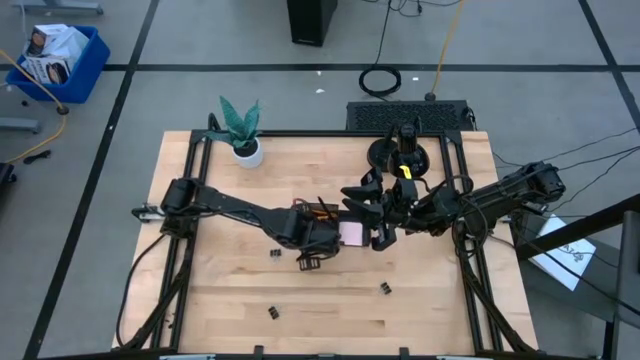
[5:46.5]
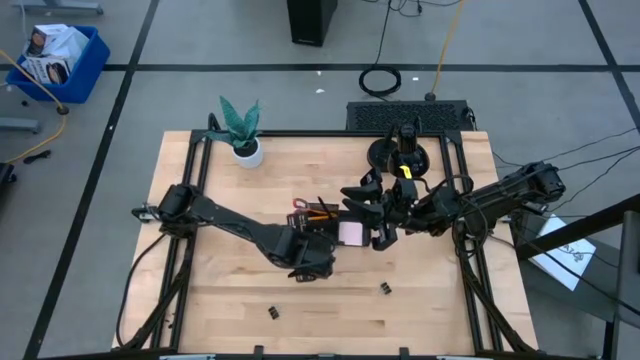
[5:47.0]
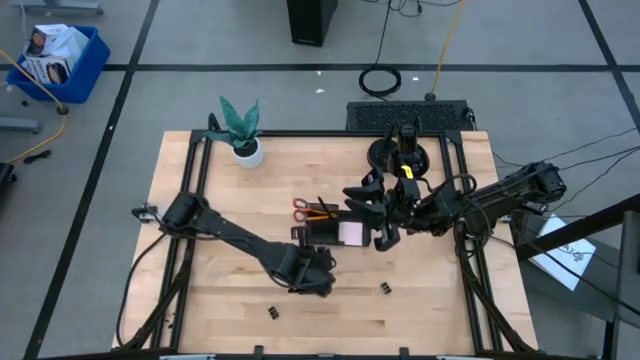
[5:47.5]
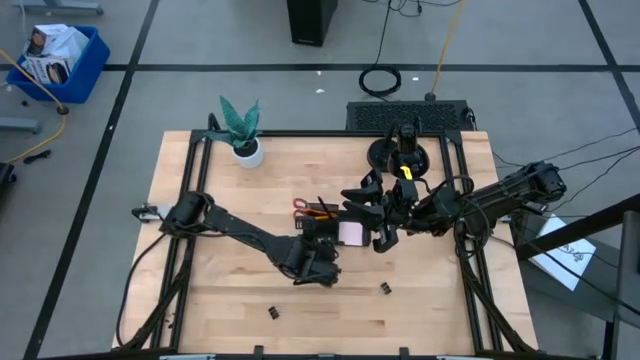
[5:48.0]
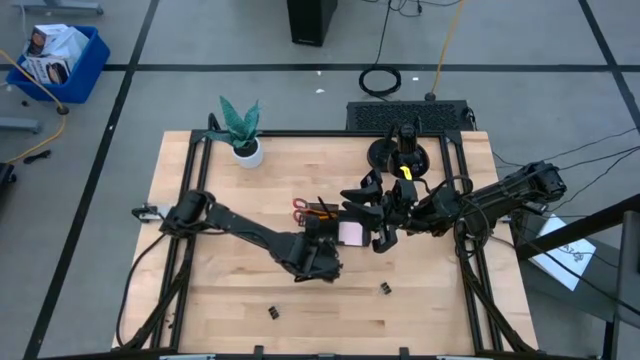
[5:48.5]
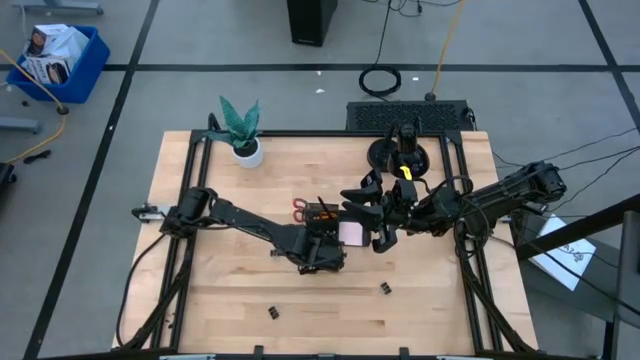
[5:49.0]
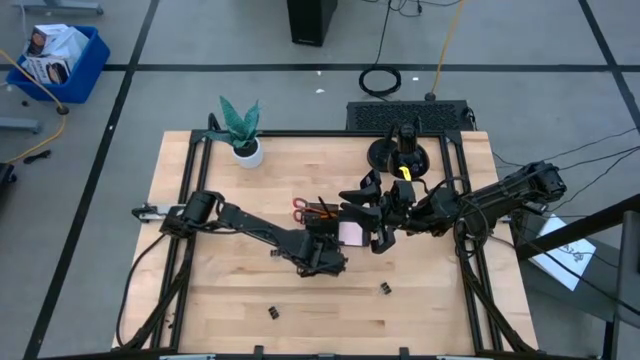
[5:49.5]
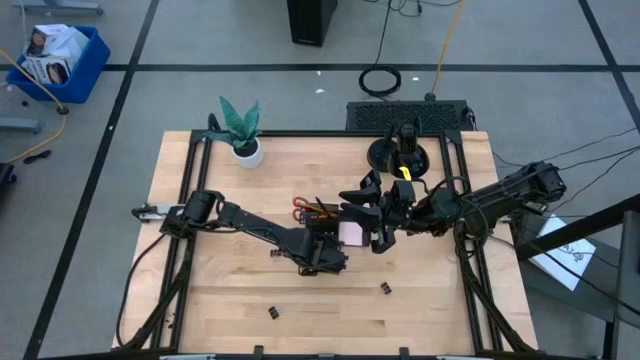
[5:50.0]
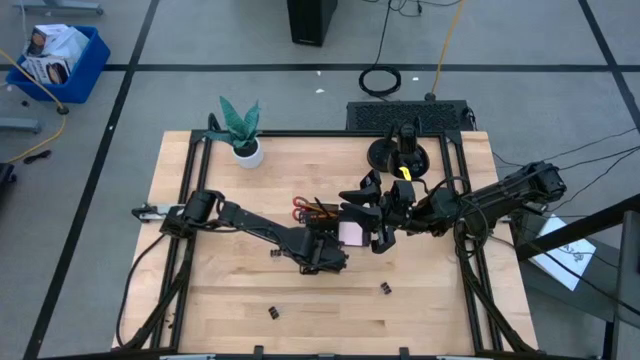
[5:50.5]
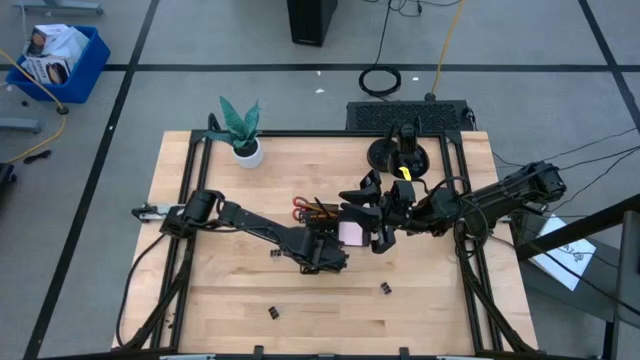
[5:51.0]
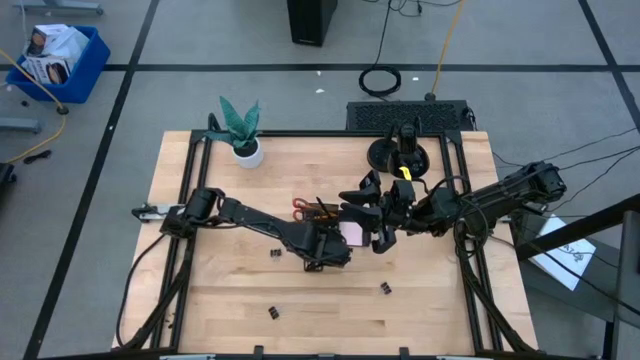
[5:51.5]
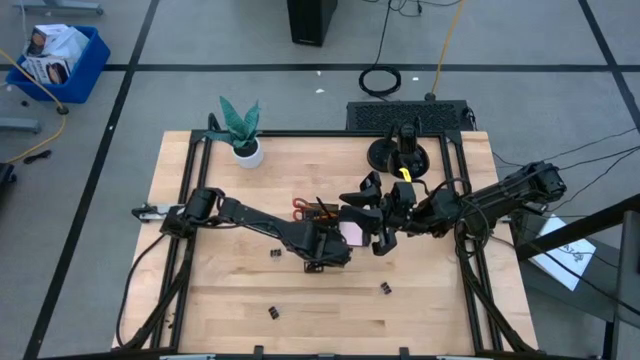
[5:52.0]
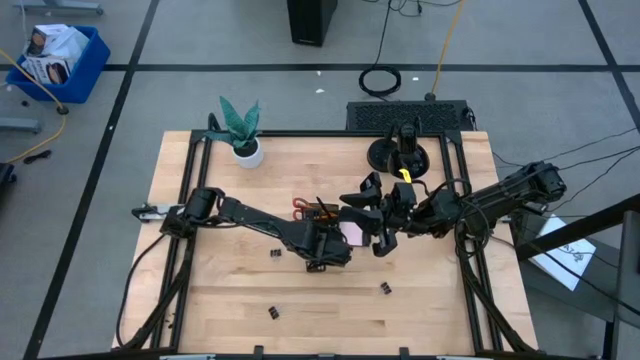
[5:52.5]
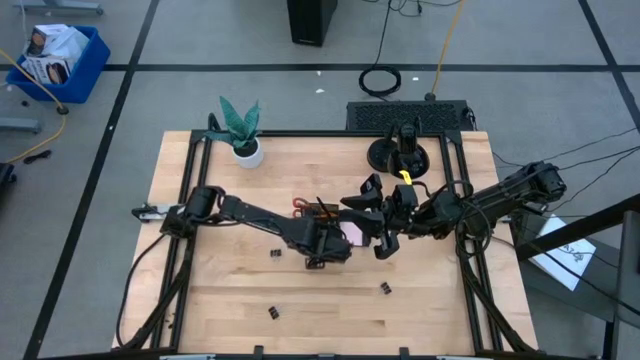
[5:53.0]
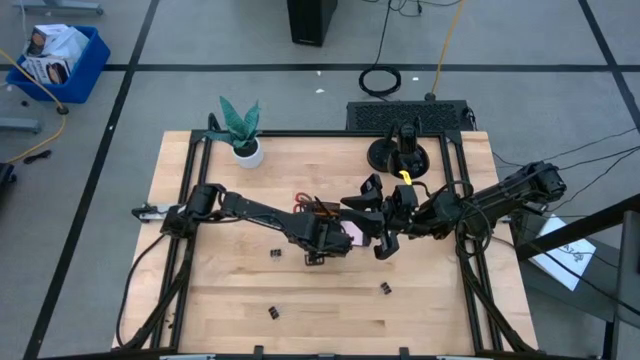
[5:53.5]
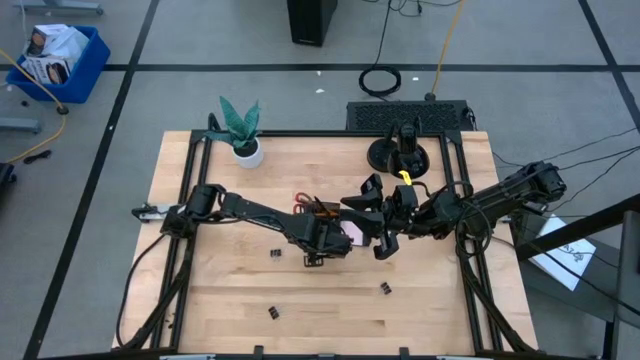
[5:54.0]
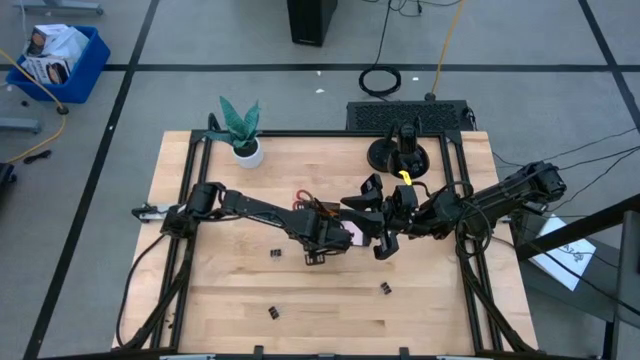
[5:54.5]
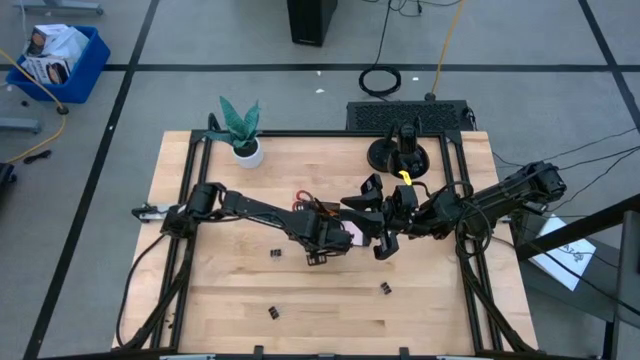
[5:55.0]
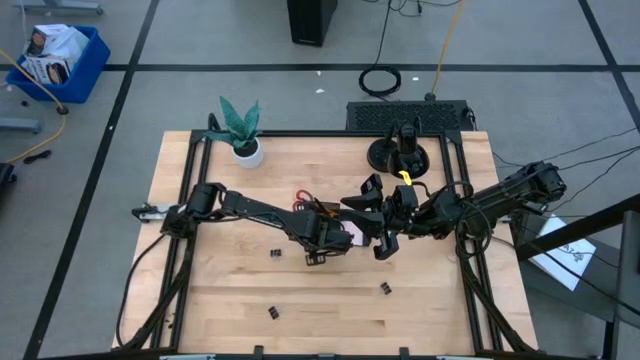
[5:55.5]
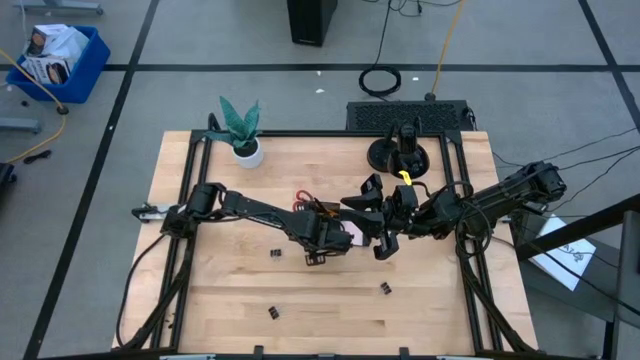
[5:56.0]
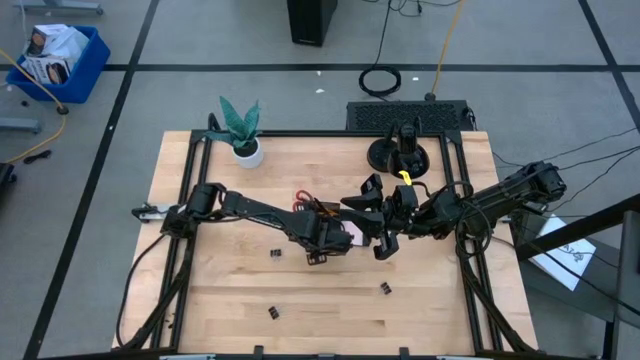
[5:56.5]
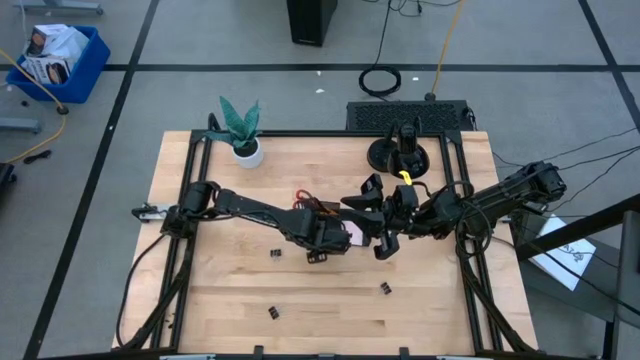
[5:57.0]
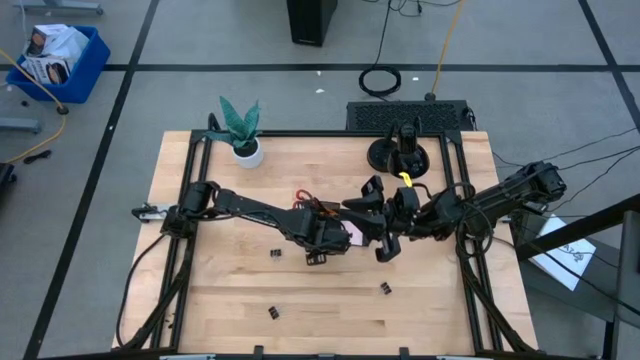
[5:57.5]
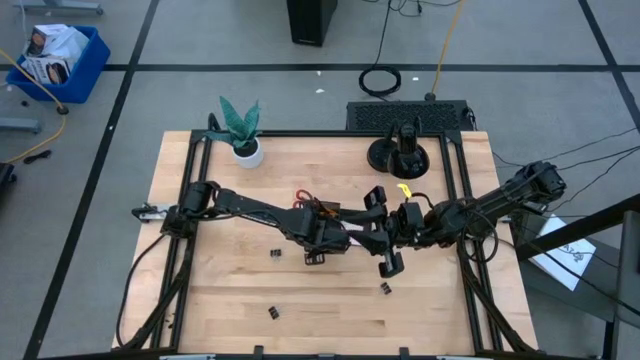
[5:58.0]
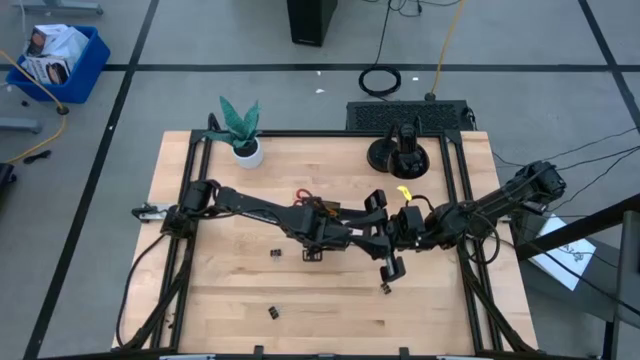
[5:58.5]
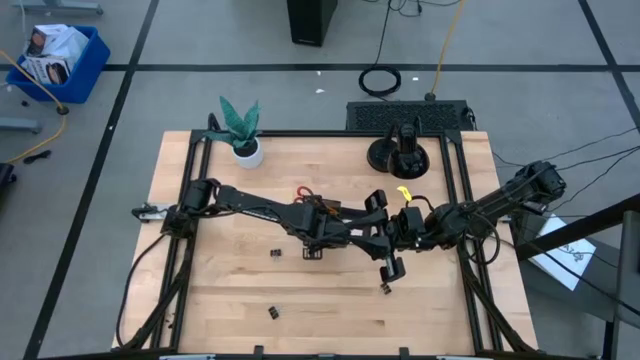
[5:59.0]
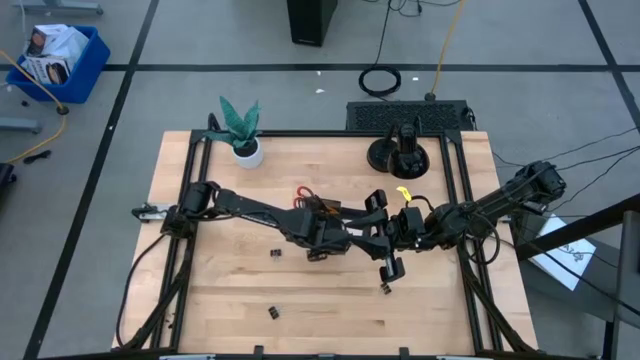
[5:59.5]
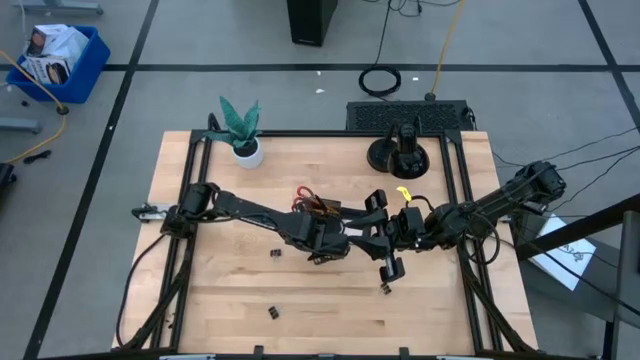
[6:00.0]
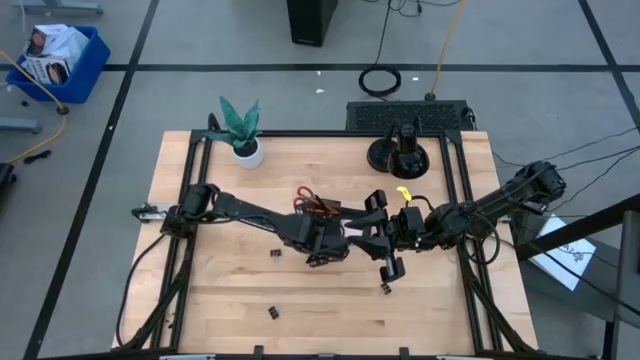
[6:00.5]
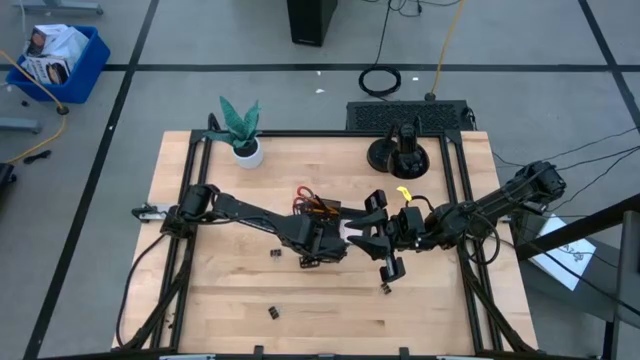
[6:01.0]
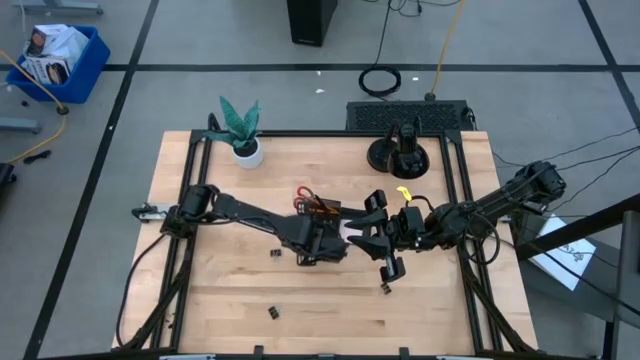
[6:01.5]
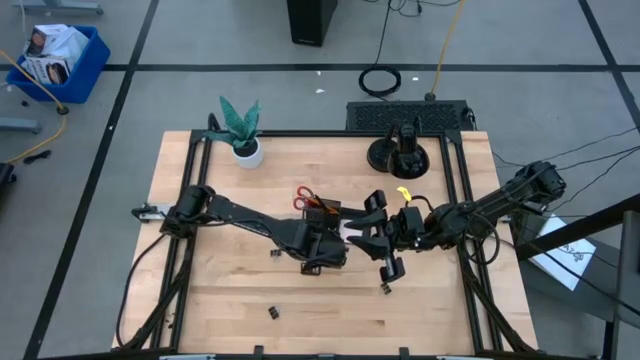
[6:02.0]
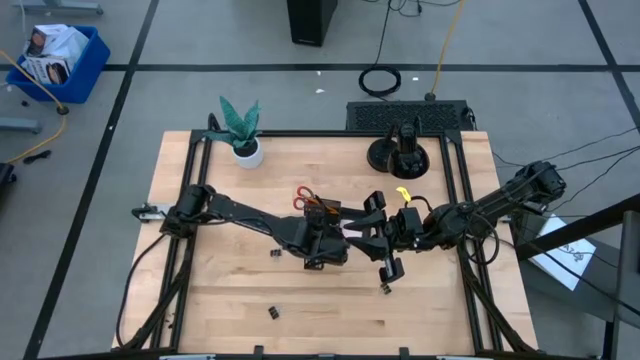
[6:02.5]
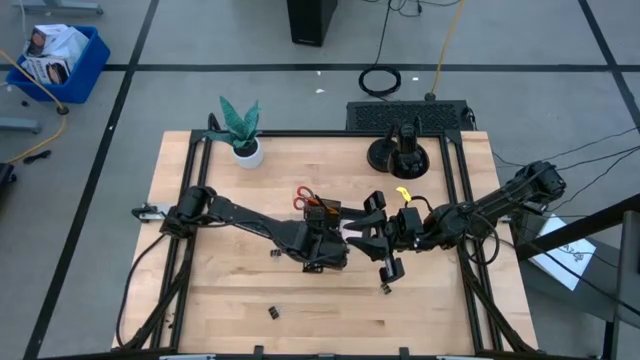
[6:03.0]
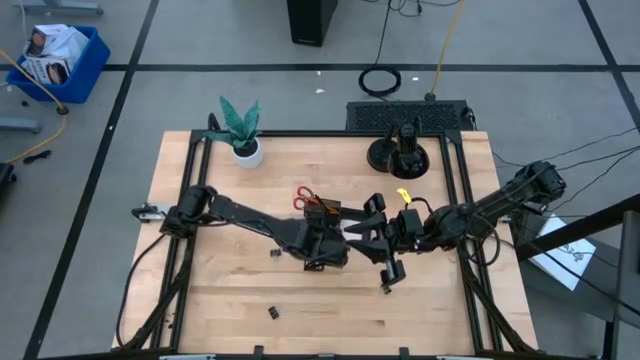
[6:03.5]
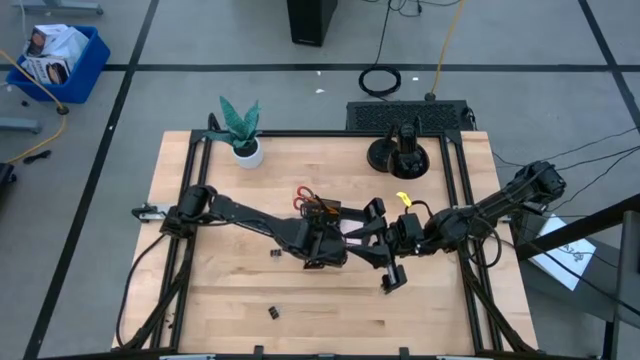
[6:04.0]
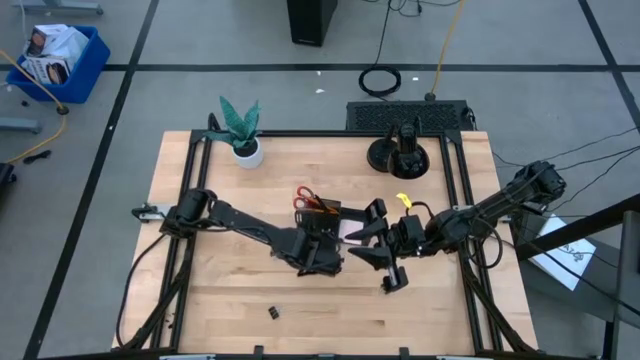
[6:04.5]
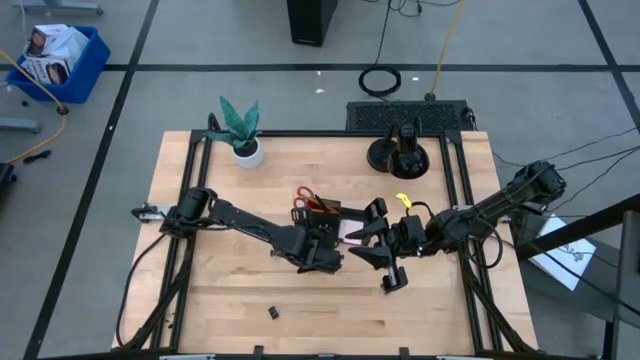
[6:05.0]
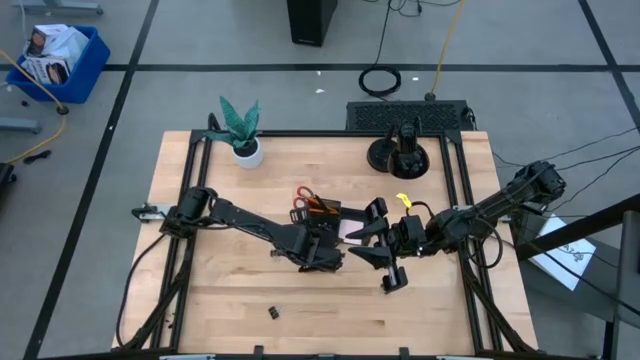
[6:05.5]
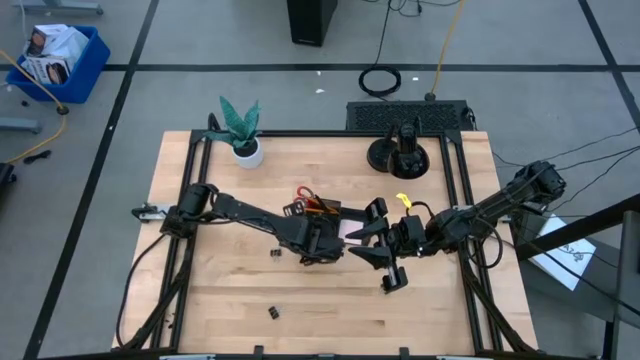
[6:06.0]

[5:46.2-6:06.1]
Task: Pick and place office supplies into organizer
Put the green eraser into the desk organizer
